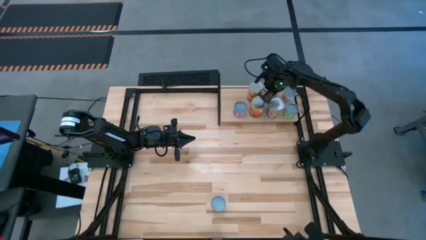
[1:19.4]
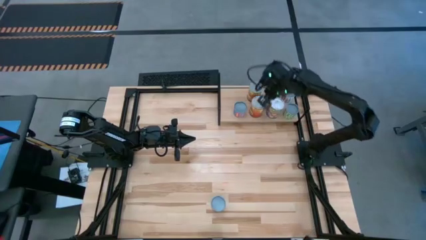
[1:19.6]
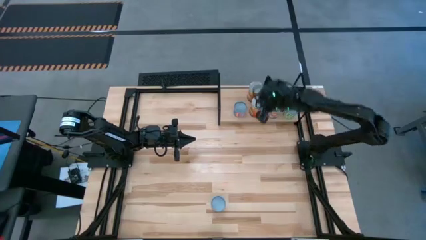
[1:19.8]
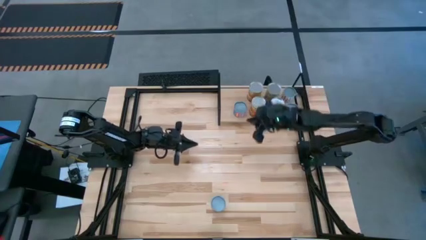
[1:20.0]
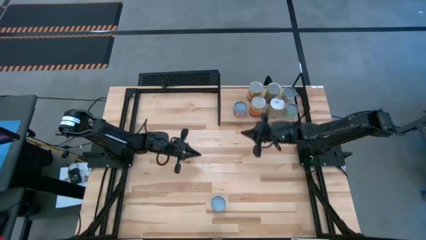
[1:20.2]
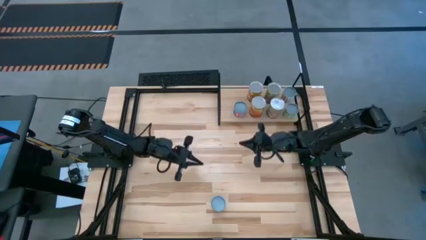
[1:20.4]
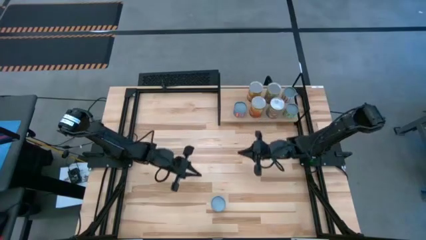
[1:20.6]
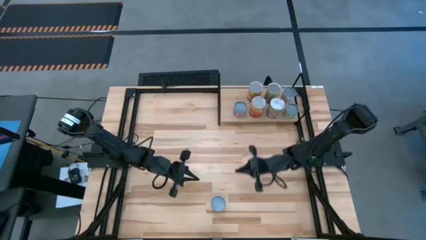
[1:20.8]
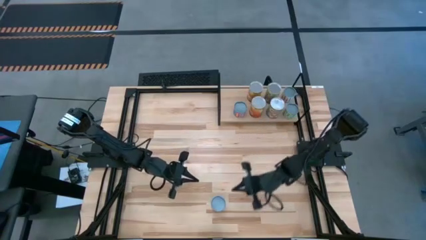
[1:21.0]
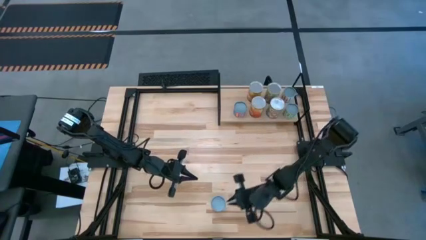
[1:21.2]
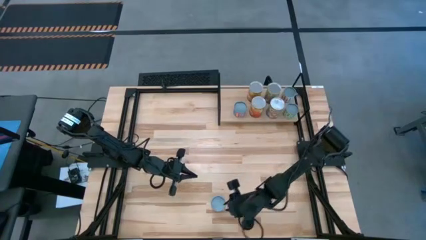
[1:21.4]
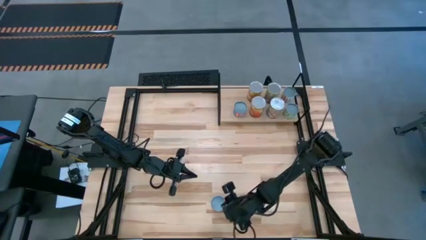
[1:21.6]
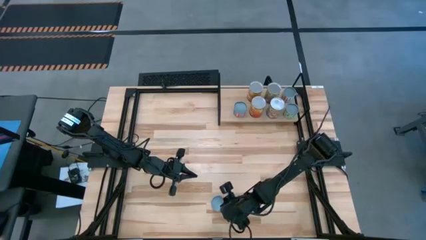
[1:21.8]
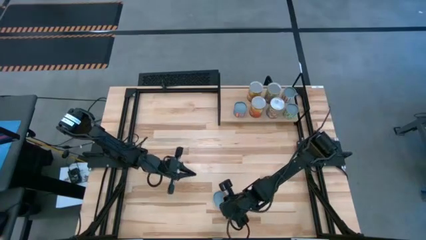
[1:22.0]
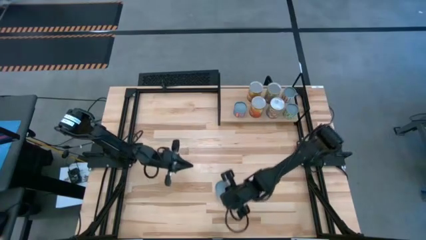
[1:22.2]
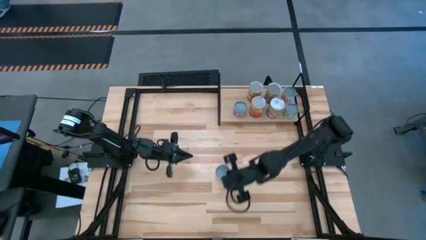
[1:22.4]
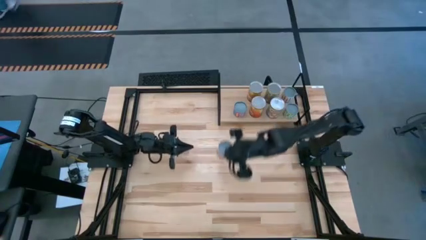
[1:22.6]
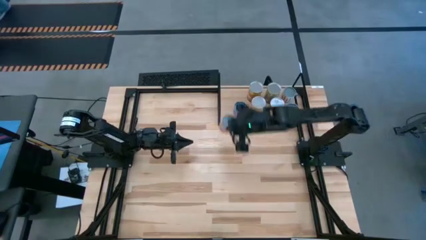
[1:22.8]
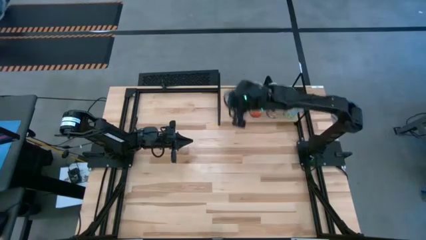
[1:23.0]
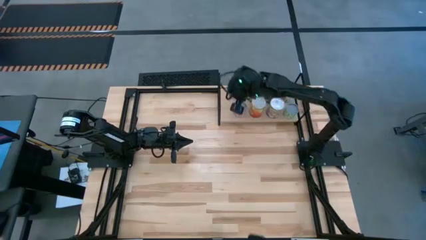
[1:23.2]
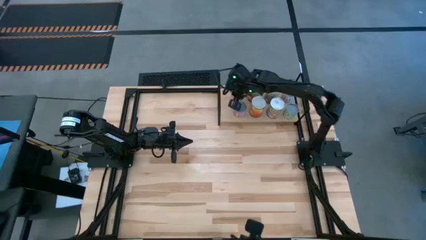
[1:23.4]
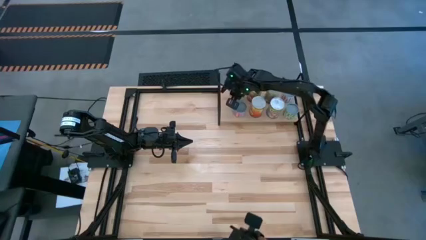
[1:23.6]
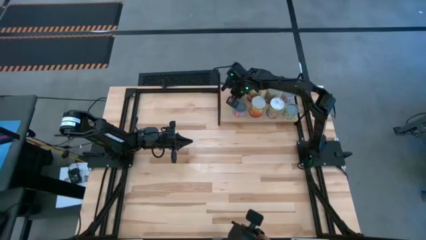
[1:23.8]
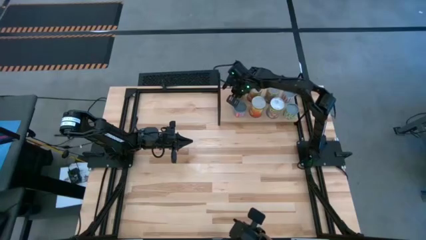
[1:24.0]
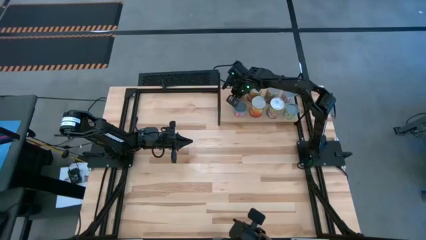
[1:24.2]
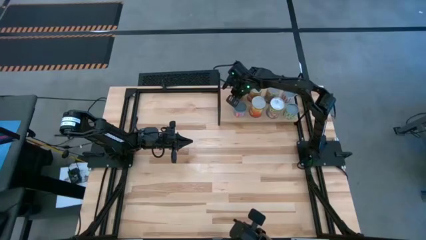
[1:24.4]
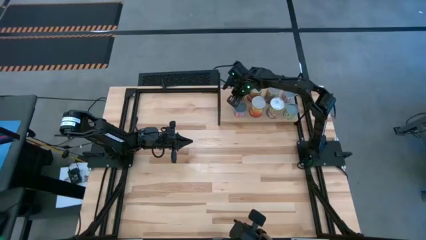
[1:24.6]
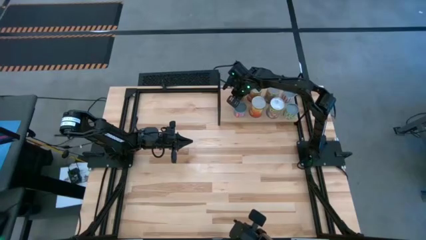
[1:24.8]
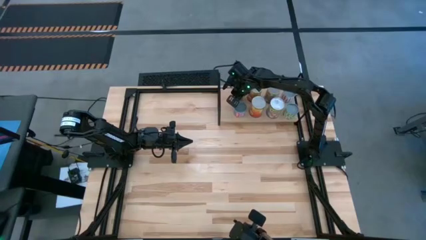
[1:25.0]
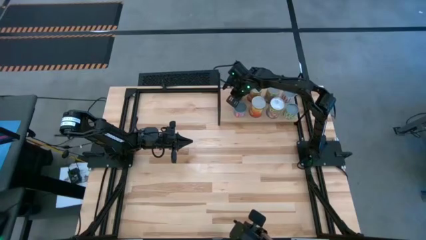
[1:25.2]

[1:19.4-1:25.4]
Task: Pick and place cans onto a shelf
Put the canned orange on the shelf

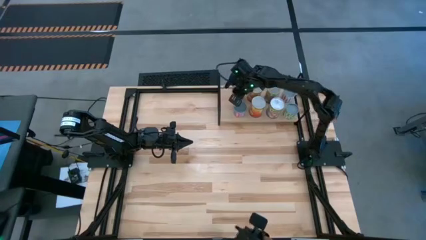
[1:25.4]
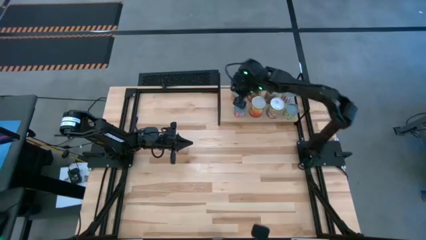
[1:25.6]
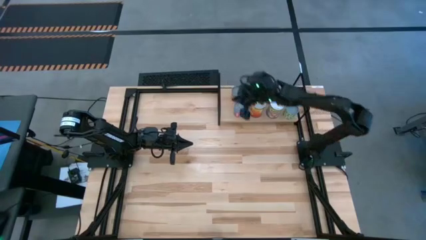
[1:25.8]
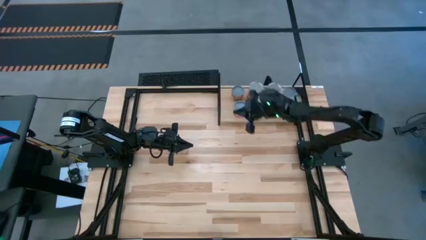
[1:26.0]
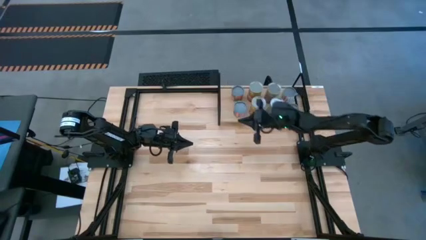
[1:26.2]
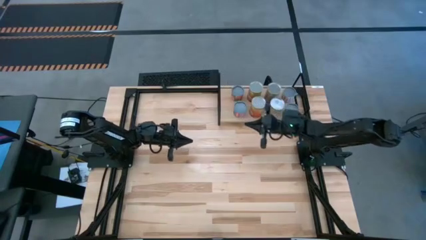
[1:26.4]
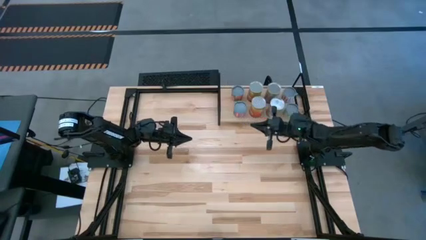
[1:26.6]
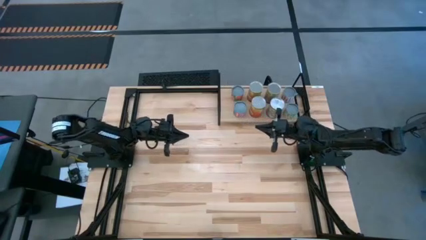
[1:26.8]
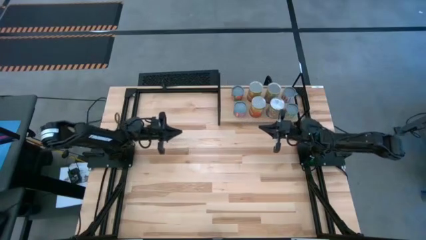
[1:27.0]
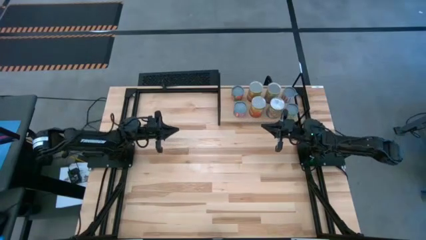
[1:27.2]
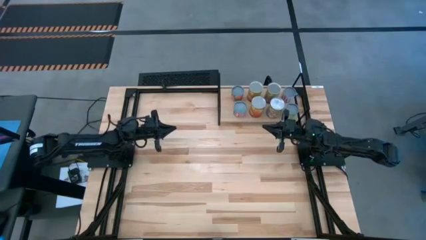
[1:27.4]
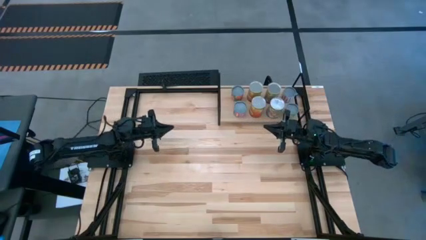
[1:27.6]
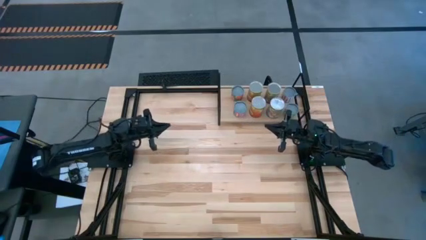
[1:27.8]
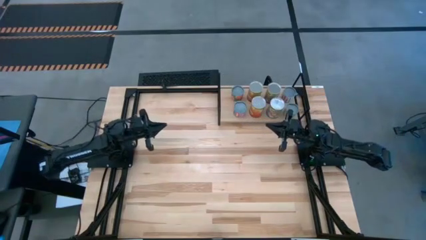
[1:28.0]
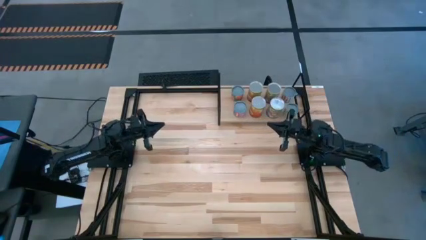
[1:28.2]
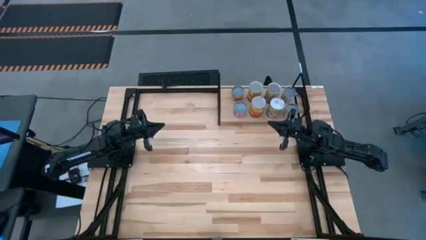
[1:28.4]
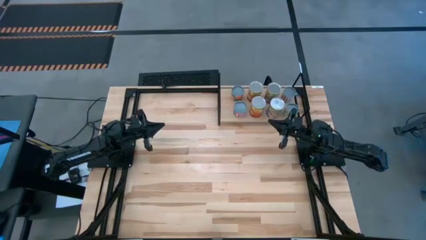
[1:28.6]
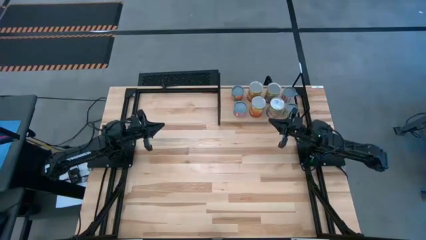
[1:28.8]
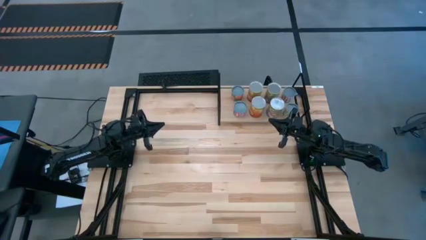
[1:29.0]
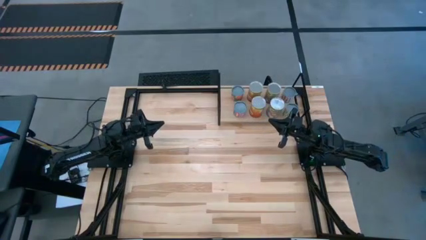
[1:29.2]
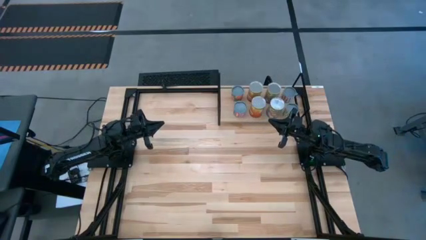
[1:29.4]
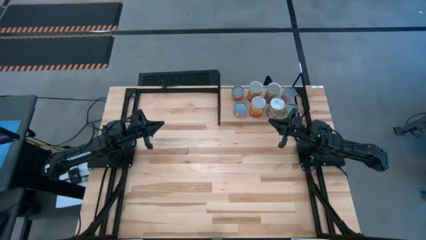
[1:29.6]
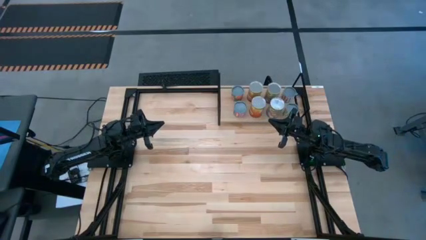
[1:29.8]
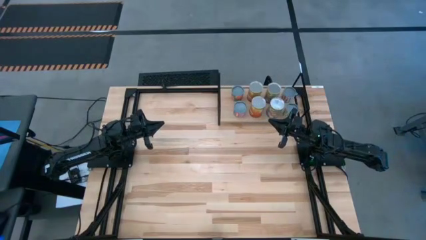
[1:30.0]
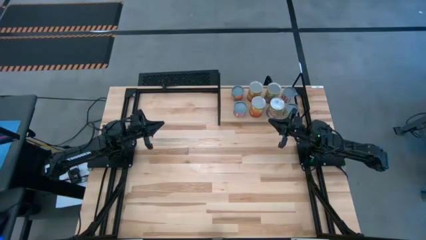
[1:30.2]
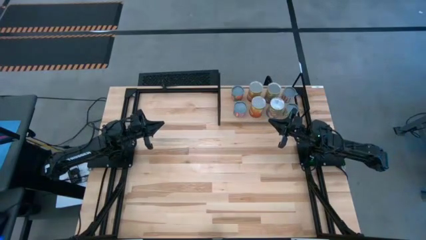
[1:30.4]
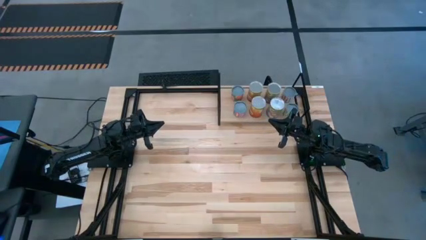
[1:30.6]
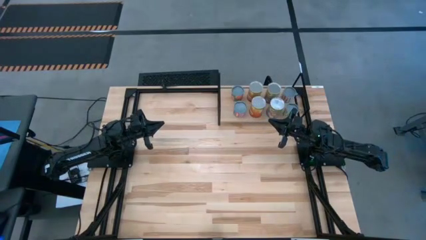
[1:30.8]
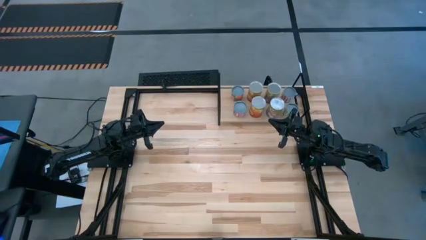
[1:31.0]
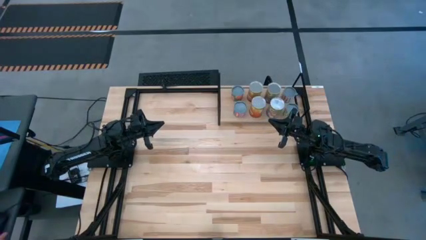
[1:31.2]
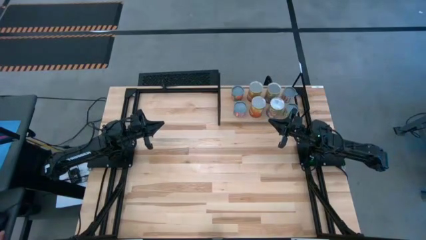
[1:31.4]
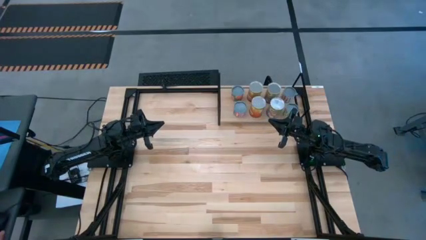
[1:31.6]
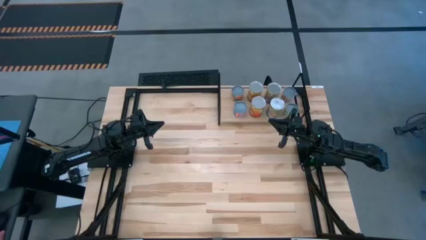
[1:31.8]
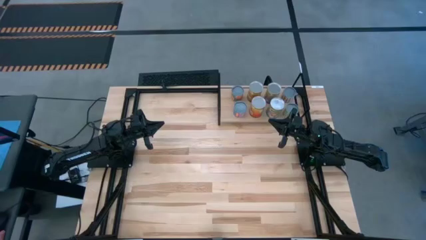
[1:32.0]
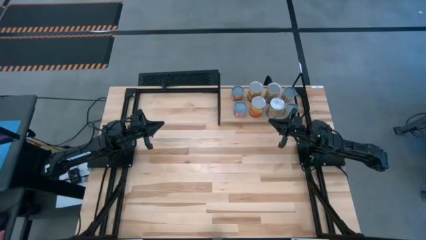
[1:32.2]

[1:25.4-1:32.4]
Return to Home Position

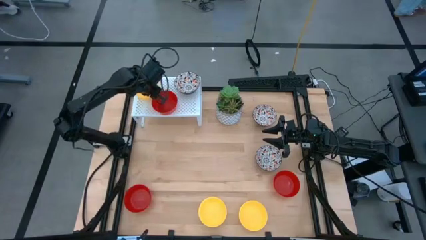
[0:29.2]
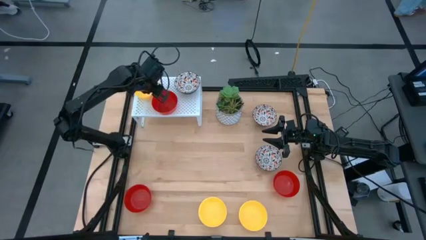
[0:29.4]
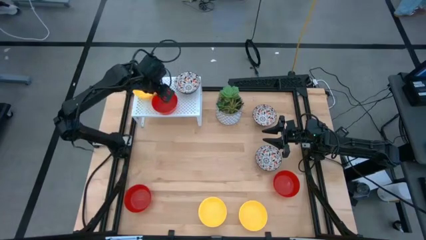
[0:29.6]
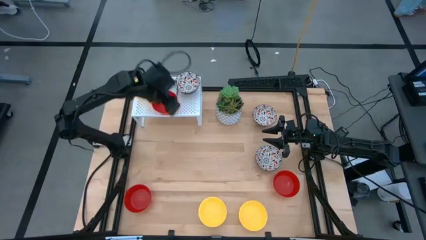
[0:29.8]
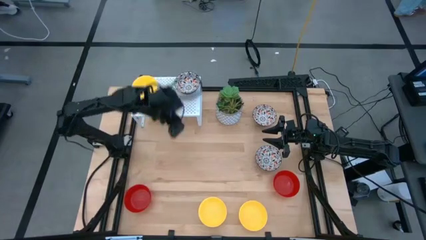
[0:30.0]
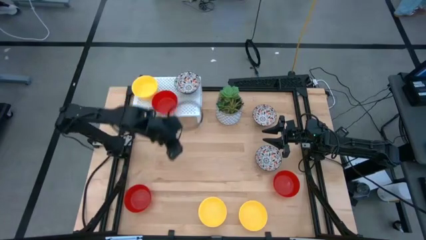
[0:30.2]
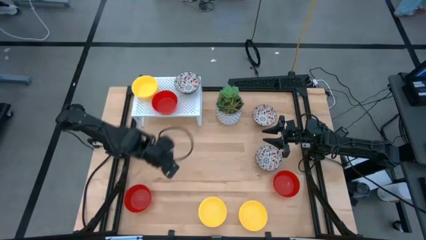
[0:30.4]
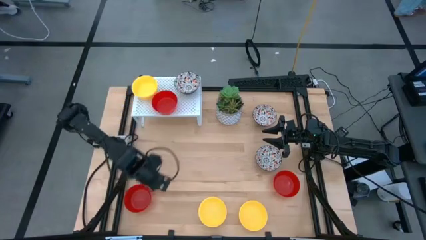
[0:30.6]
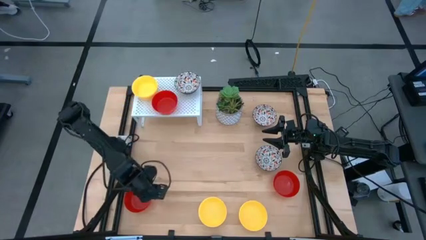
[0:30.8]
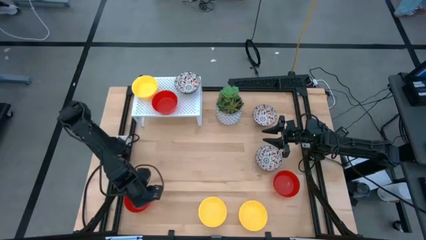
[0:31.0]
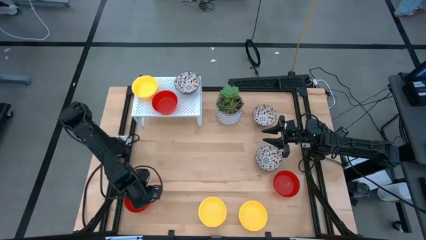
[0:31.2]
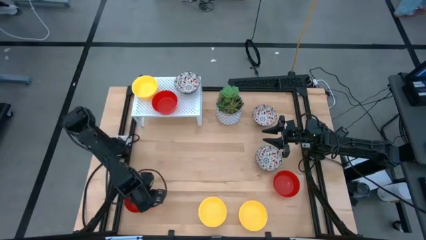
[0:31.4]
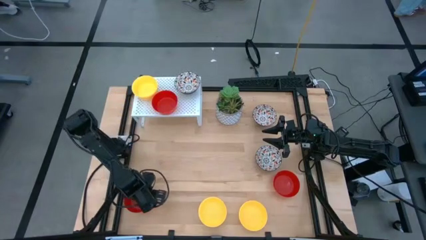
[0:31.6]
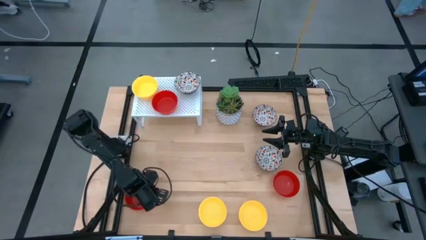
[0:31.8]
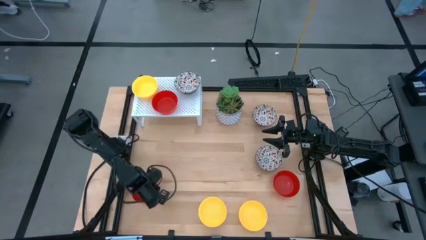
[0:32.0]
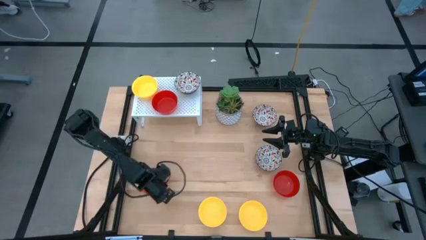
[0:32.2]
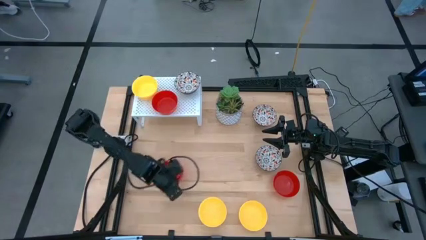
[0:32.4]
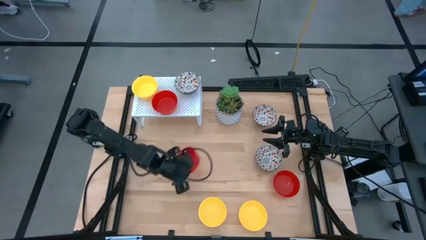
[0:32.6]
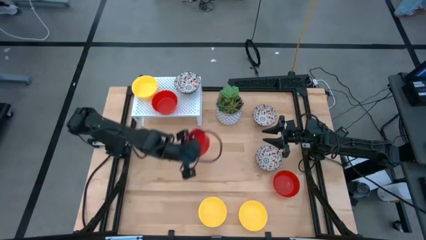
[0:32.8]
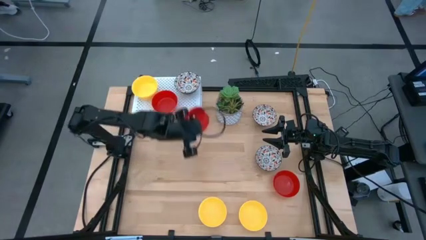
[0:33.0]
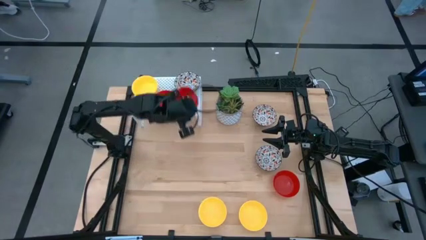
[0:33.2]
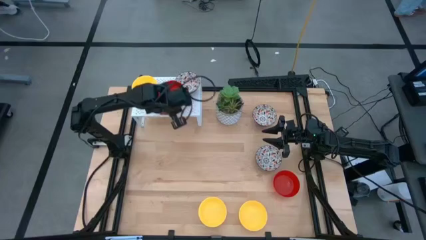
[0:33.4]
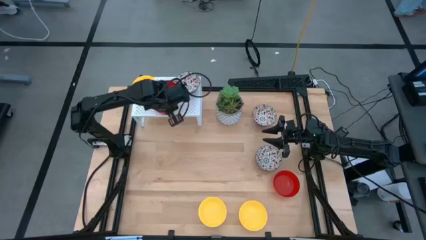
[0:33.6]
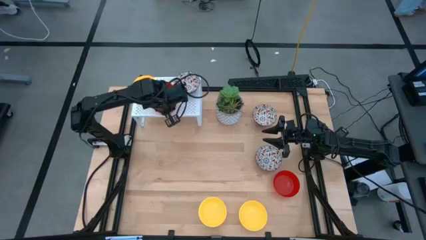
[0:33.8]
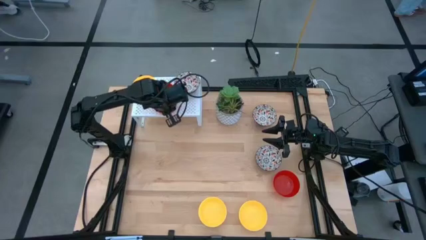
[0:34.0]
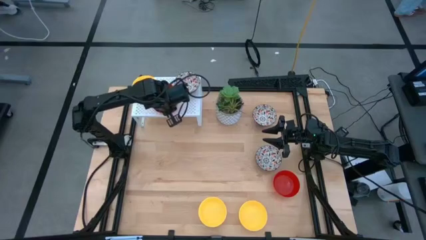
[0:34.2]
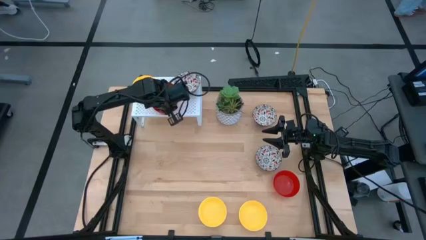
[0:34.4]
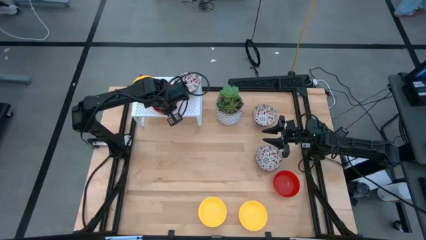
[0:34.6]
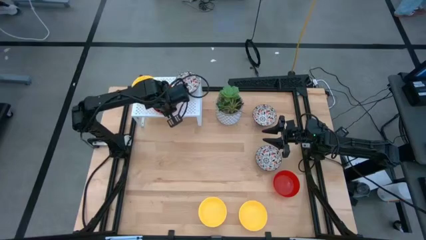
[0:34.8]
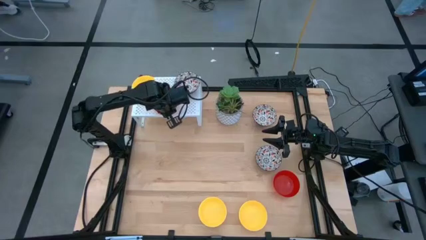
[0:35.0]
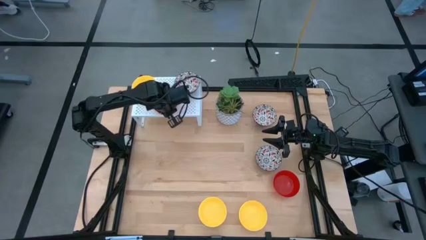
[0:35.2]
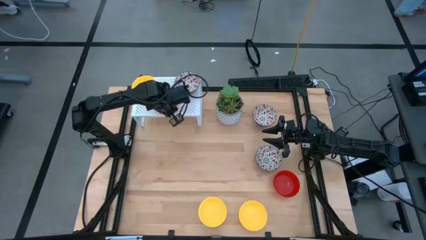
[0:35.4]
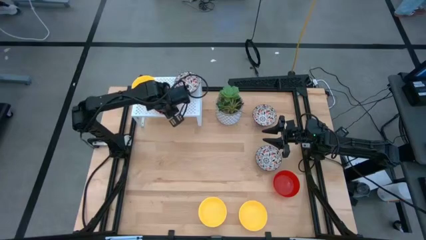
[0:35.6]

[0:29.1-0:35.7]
Task: Pick & Place Mini bowls
Stack the red bowl on top of the other red bowl on the shelf
